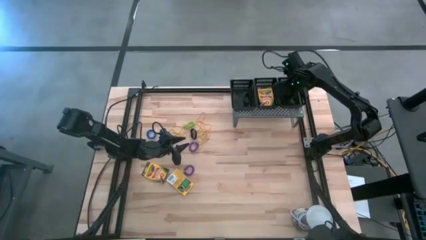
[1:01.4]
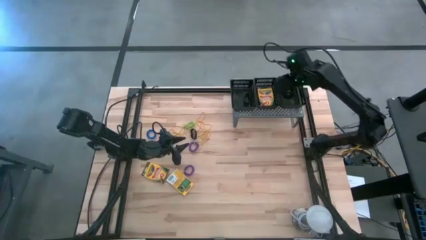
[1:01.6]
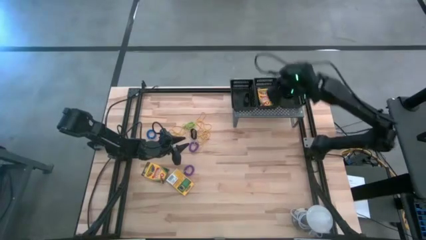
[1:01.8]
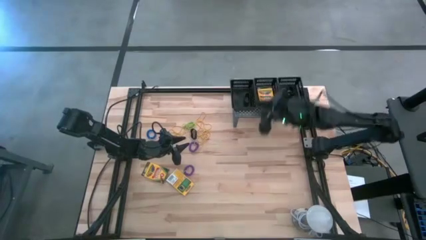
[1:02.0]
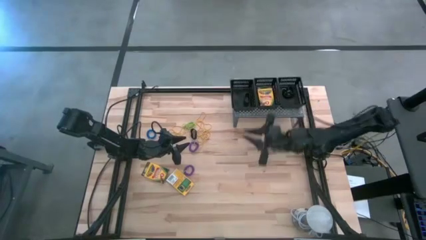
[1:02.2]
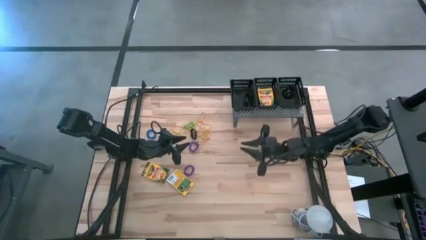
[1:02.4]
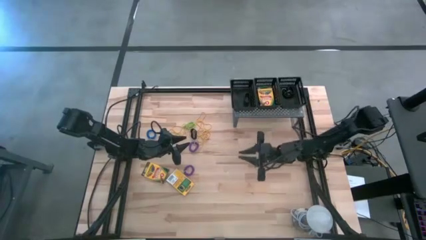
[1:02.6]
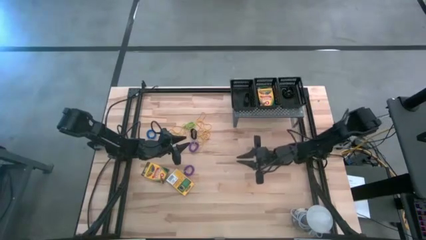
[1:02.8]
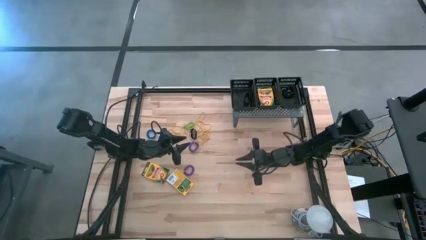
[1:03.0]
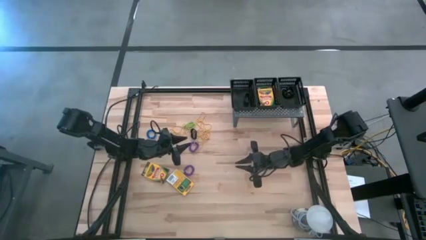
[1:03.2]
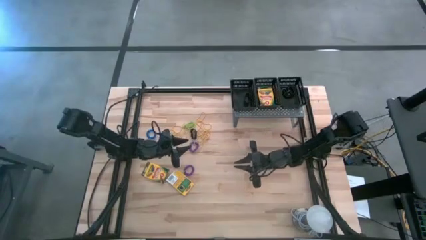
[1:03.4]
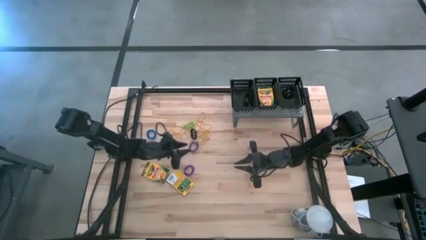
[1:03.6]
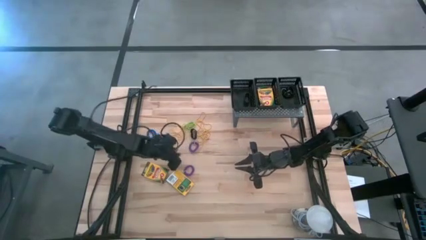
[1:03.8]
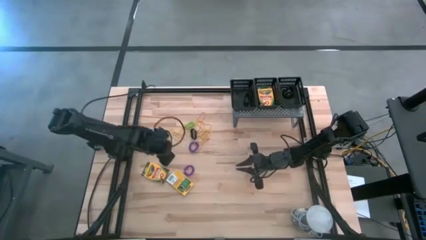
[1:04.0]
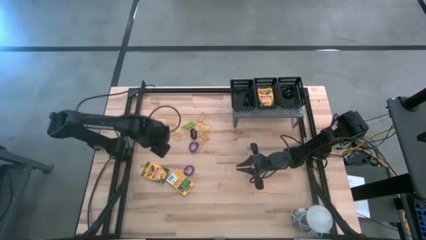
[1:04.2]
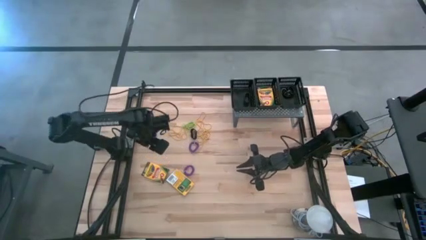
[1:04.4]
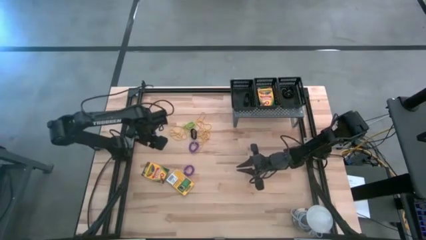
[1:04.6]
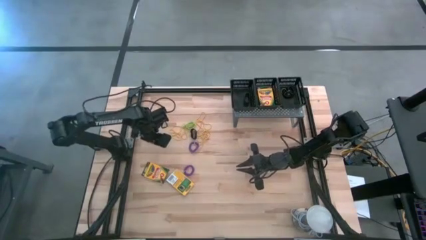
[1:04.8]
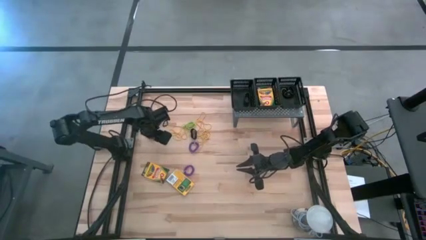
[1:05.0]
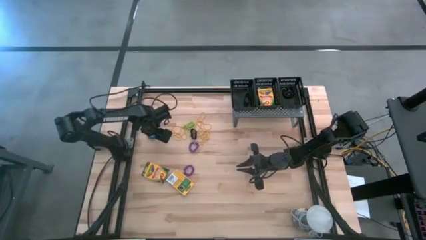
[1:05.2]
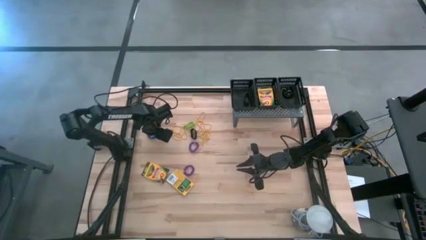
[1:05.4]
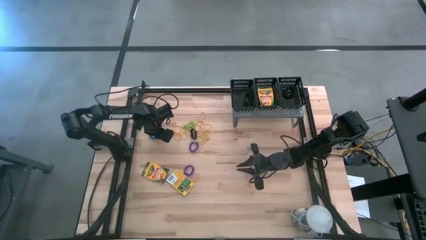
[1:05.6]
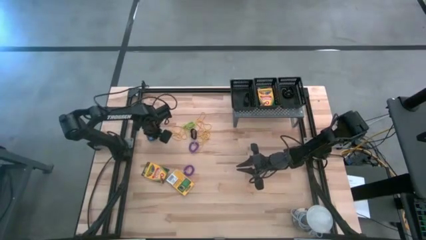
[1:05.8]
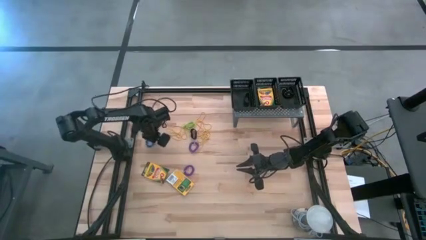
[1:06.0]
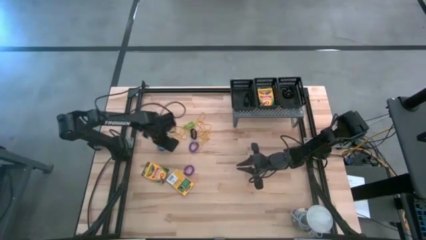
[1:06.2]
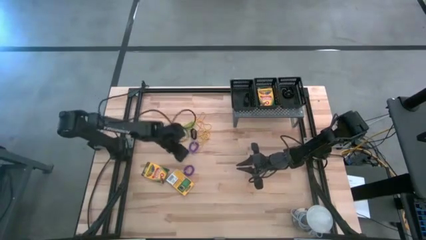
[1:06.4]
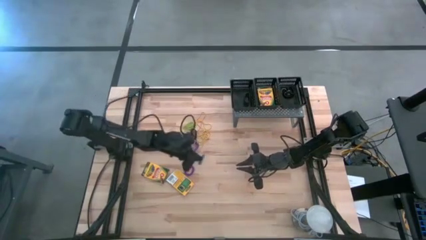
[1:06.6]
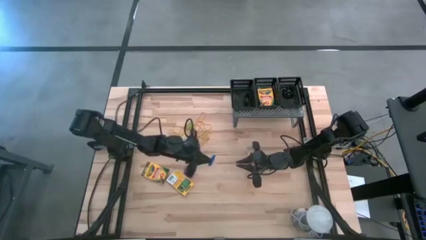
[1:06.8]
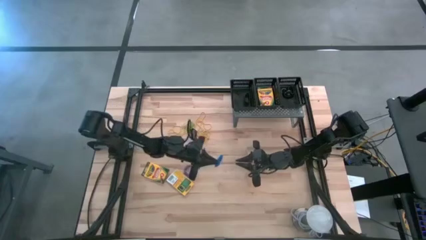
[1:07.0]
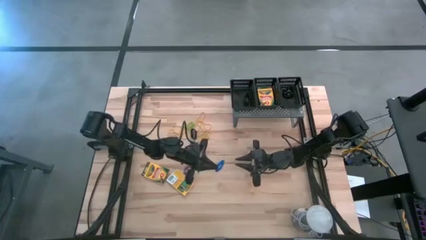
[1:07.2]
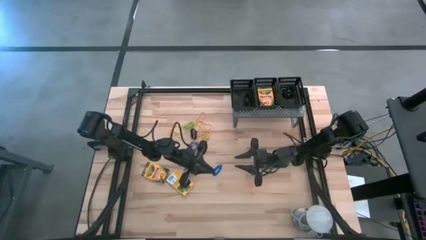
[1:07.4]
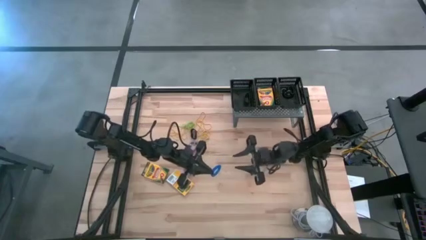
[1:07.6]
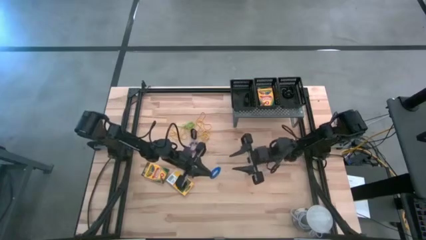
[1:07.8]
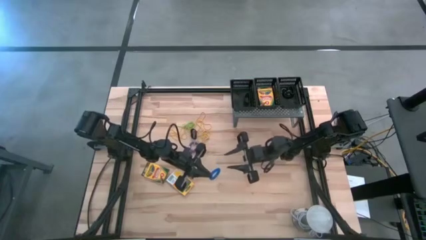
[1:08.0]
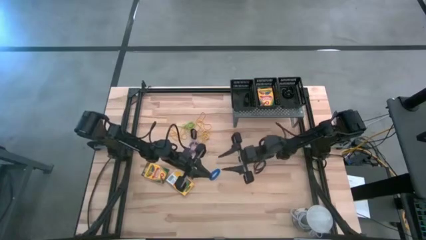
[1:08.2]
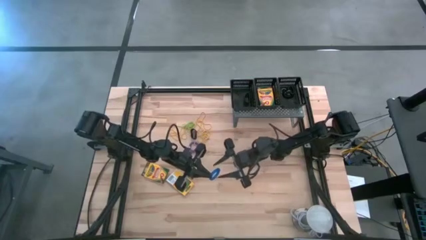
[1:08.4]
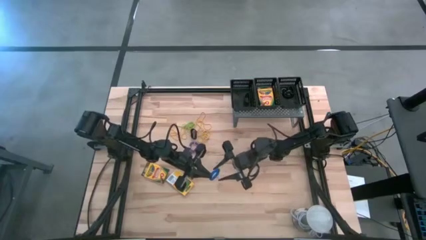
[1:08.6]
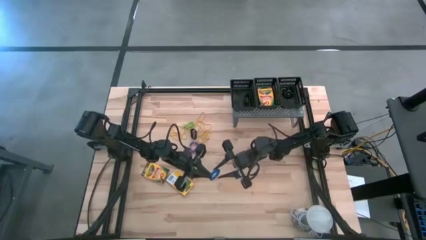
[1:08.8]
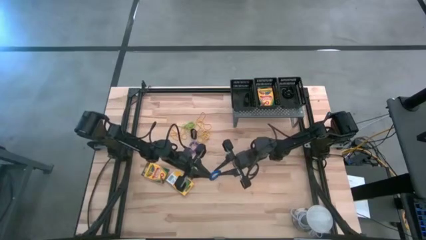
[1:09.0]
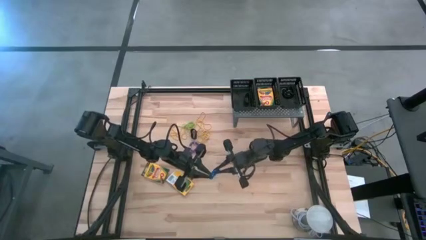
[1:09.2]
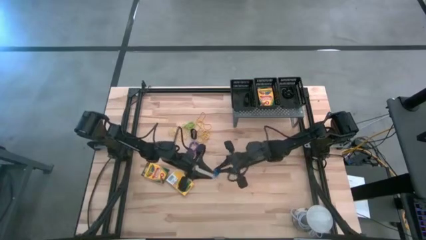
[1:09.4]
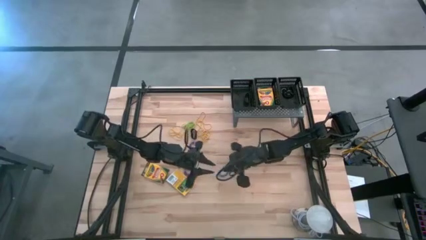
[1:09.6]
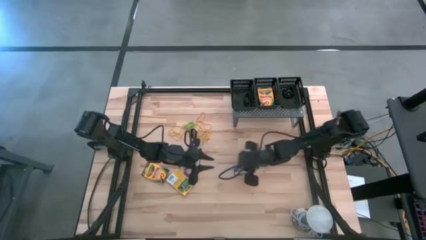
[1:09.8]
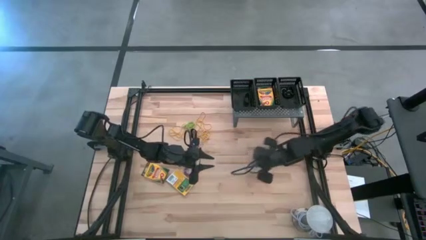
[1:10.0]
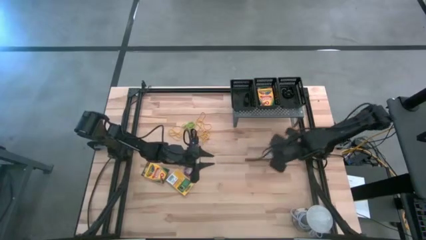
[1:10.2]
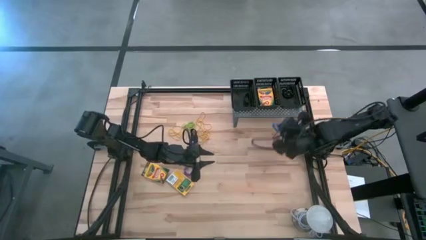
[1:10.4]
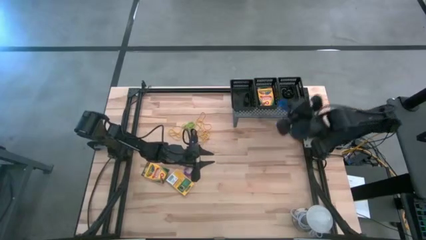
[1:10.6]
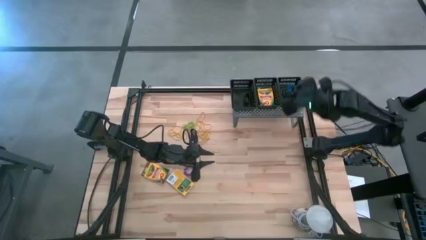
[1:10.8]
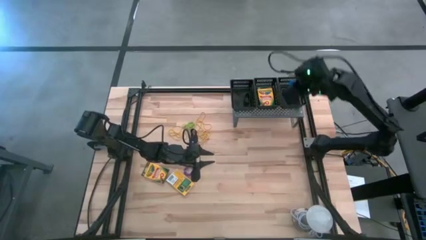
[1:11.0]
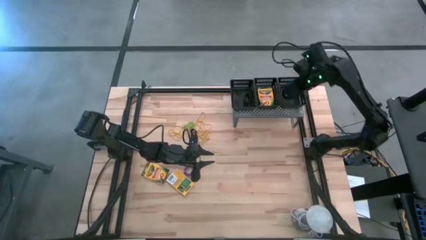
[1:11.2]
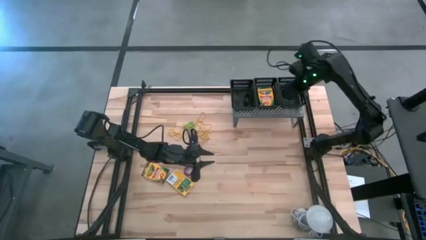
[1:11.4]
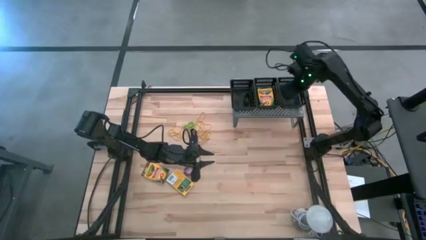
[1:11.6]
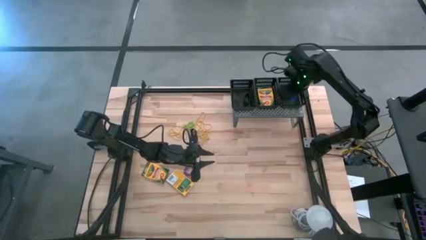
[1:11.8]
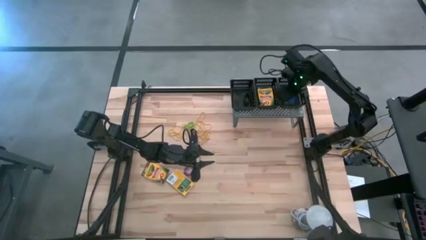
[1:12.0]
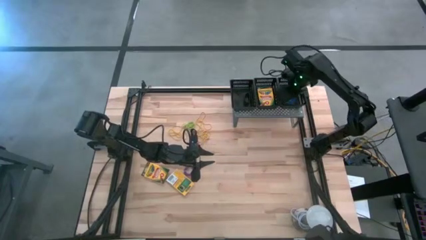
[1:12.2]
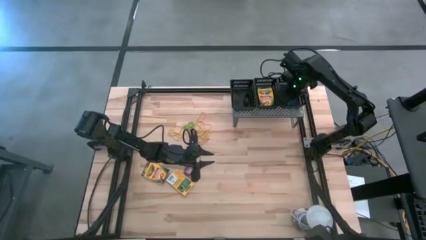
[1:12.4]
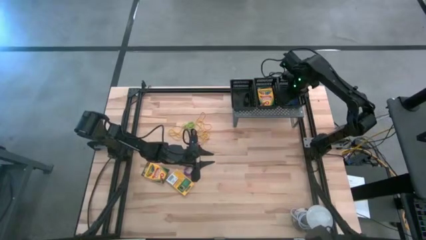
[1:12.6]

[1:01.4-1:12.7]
Task: Pick & Place Office Desk Supplies
Put the blue spring keychain into the right black basket on the shelf
